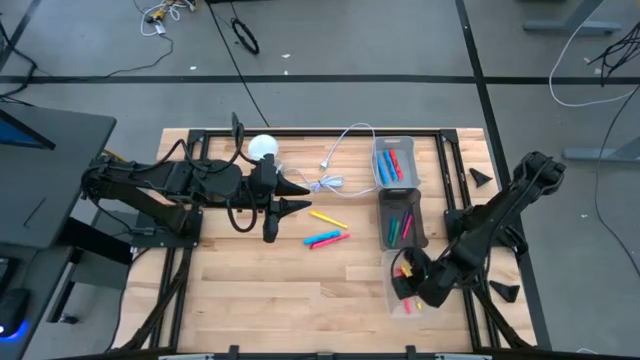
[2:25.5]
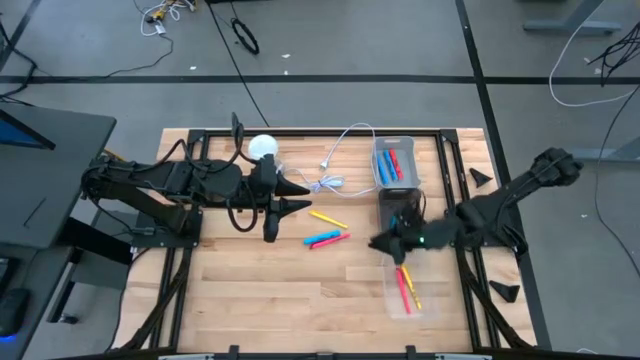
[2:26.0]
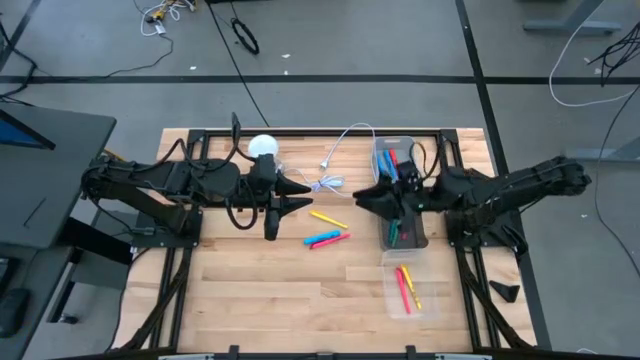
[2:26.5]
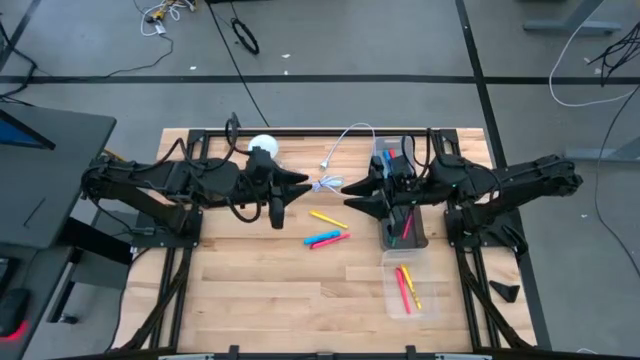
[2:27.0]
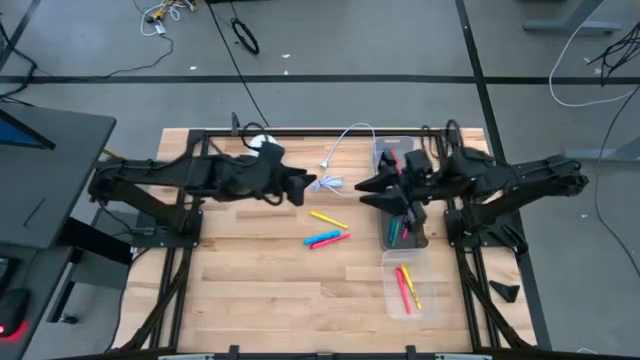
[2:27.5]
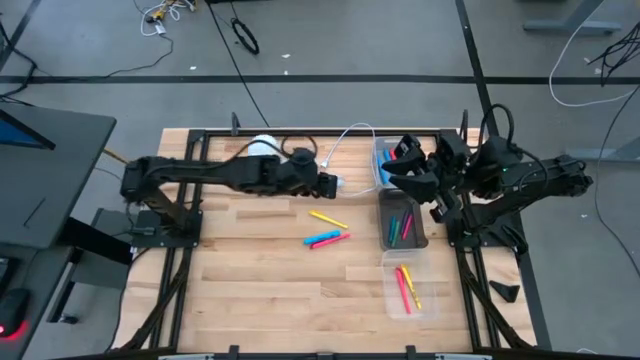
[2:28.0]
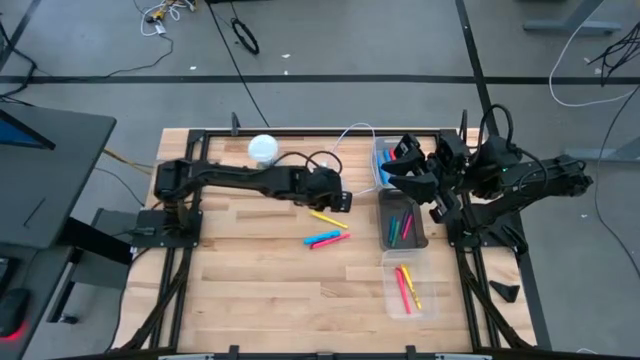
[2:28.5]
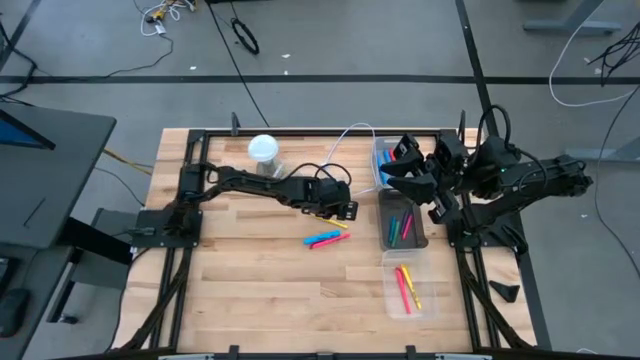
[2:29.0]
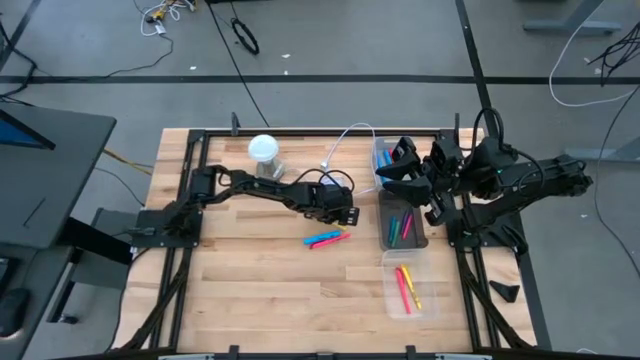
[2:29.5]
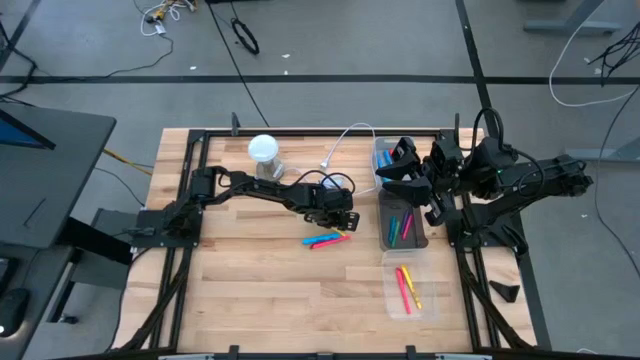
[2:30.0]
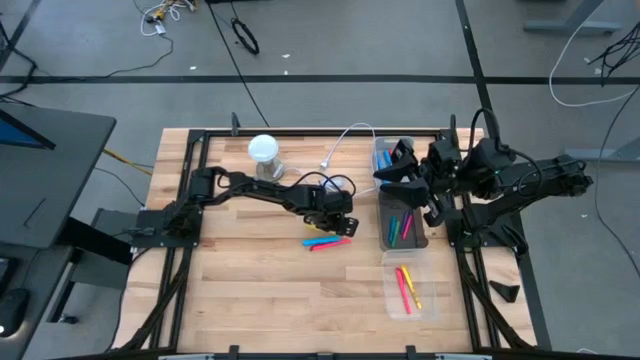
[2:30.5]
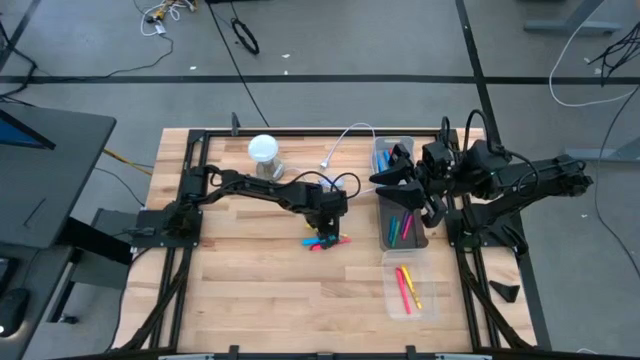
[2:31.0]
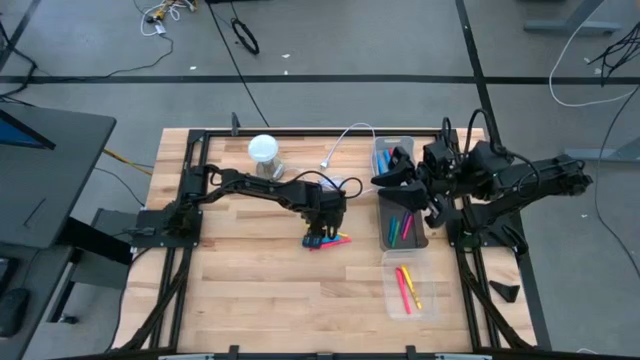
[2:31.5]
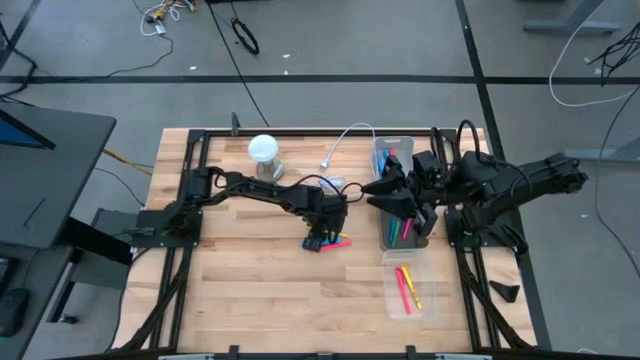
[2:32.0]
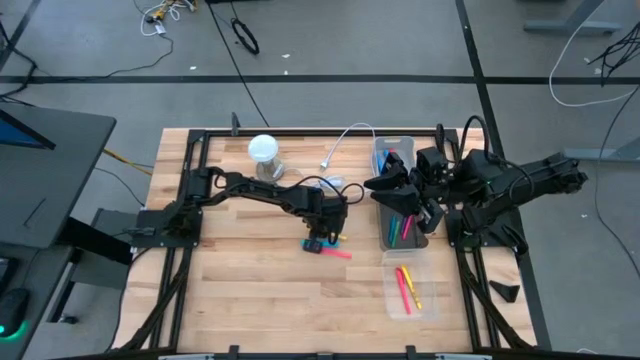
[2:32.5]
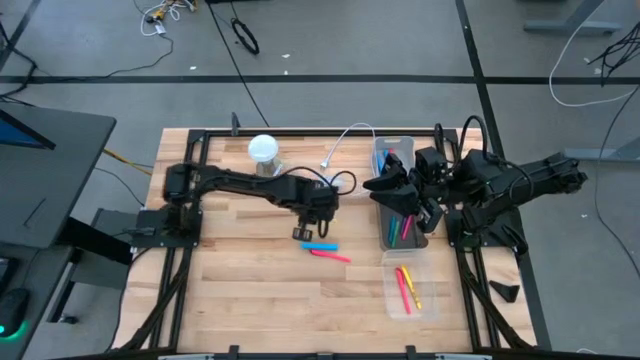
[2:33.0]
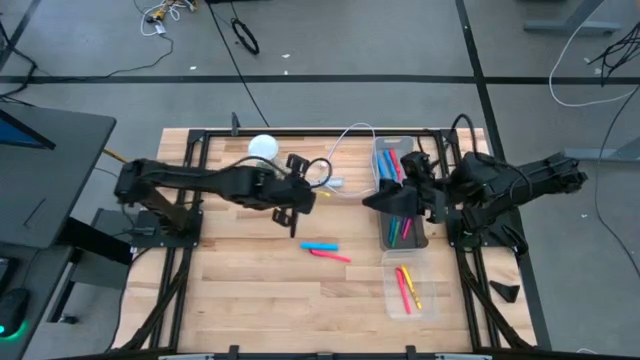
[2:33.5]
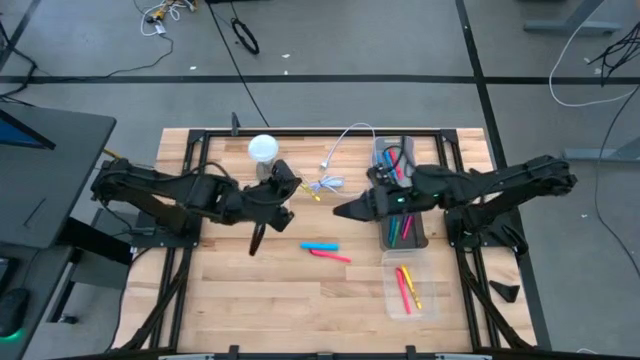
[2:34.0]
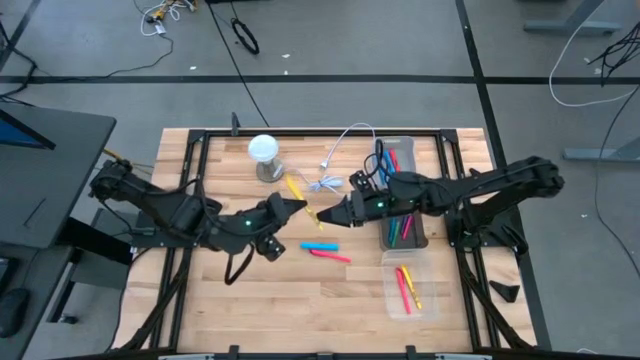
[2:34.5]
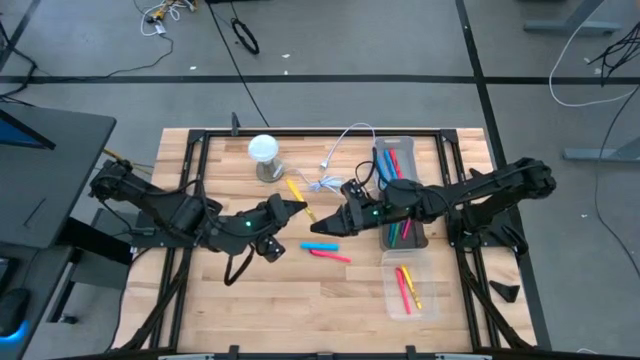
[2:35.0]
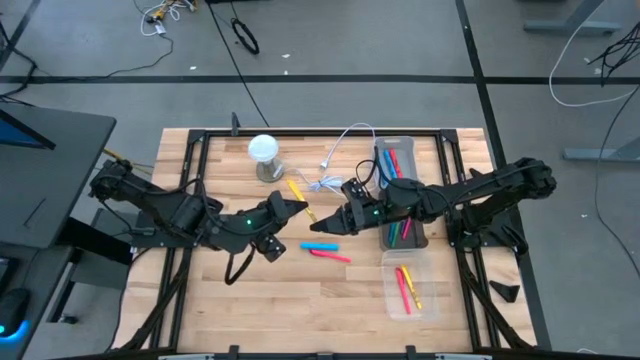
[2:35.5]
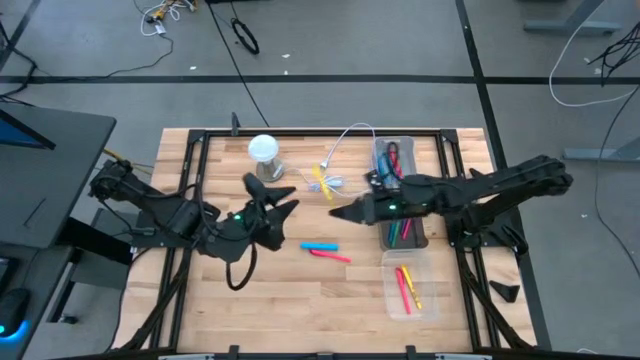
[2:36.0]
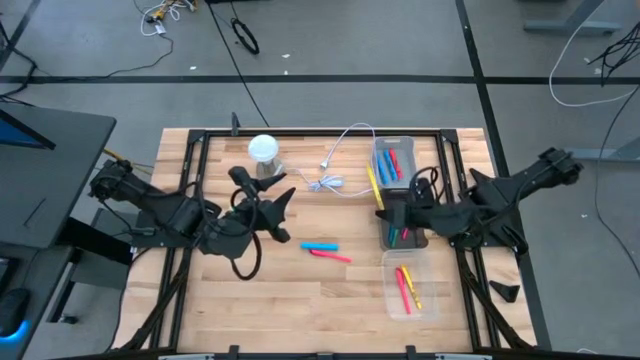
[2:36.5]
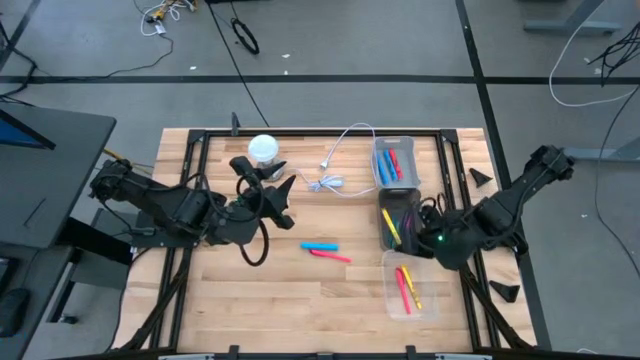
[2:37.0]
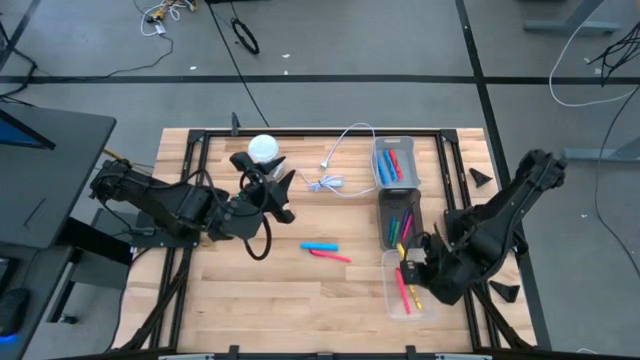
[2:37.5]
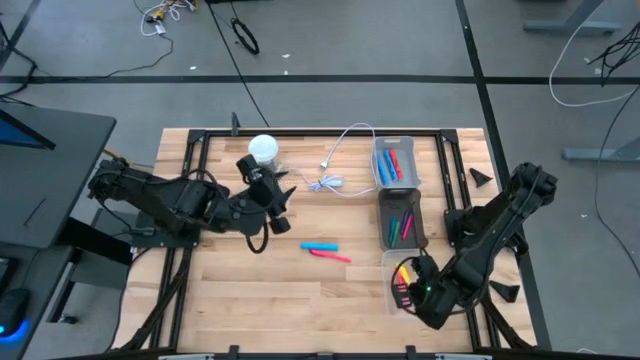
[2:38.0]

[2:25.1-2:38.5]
Task: Pick & Place Markers
Put the yellow pen into the transparent bin

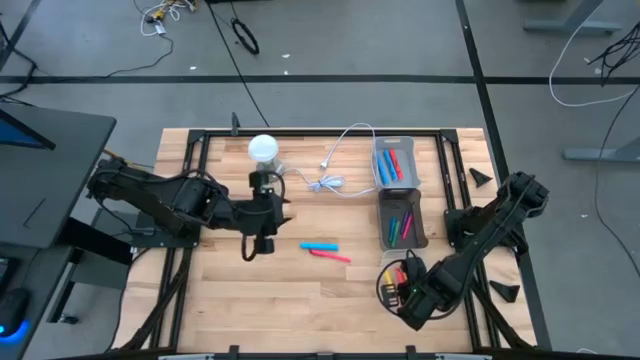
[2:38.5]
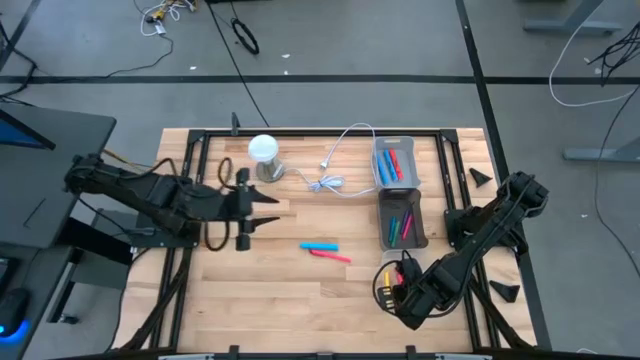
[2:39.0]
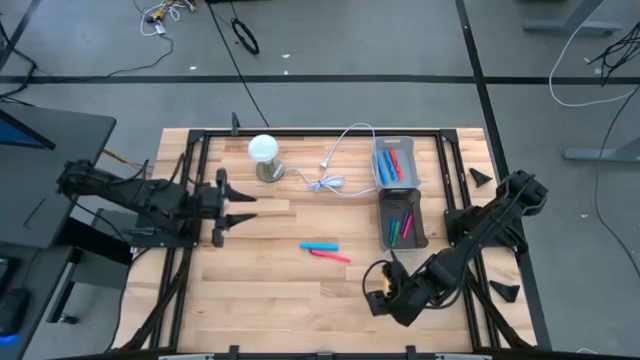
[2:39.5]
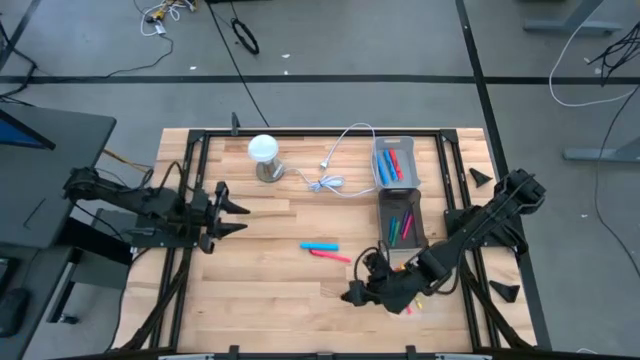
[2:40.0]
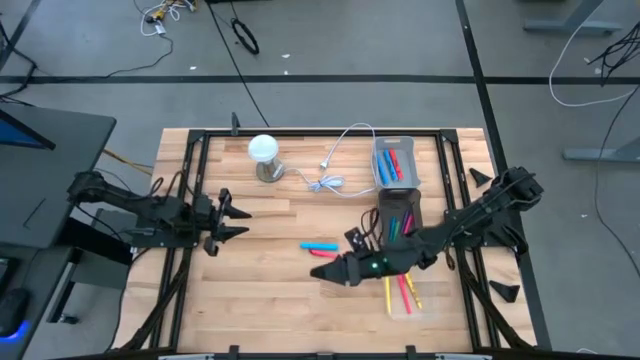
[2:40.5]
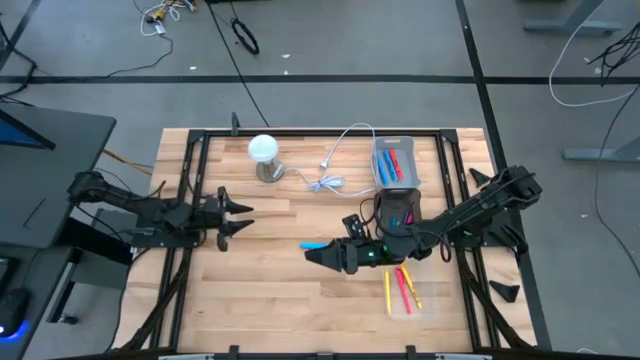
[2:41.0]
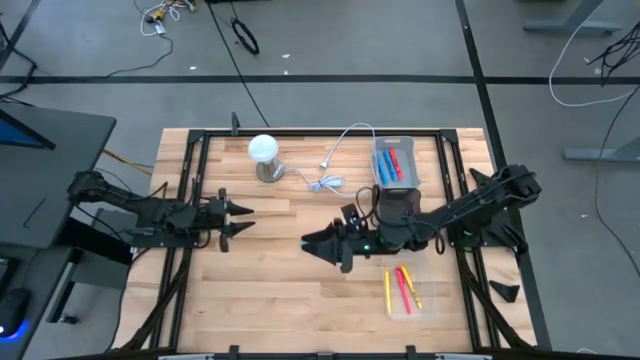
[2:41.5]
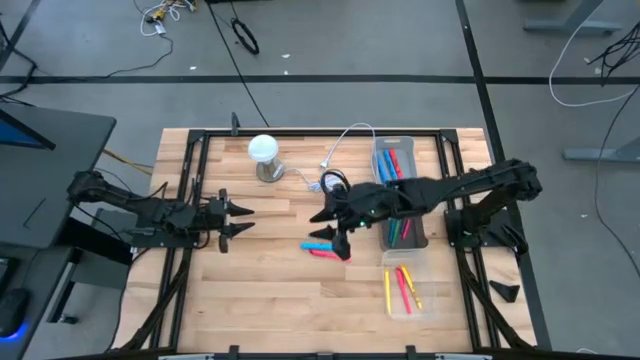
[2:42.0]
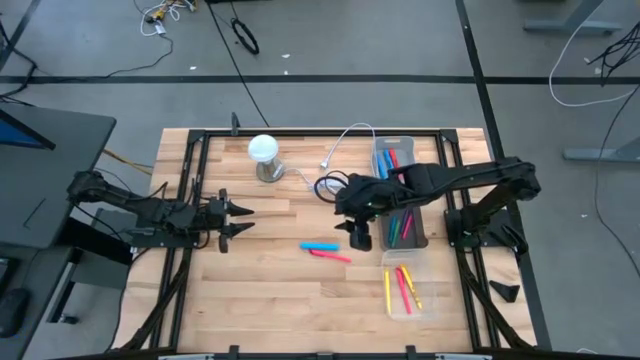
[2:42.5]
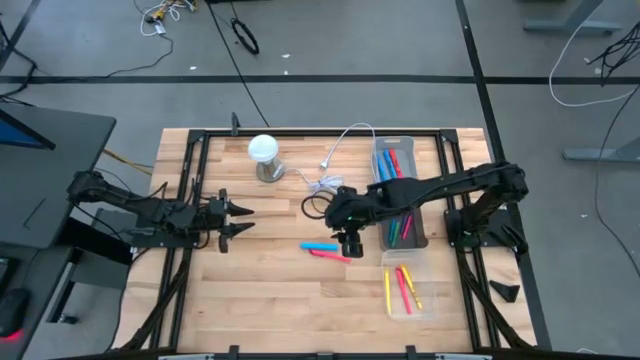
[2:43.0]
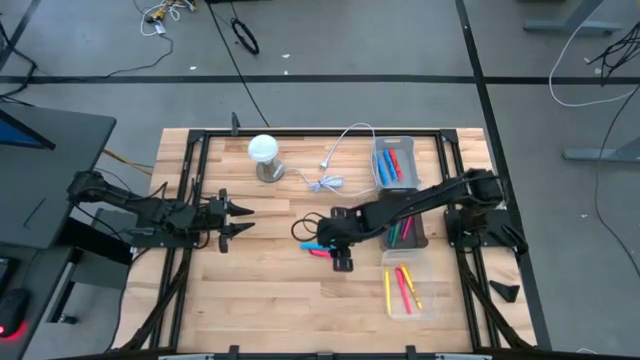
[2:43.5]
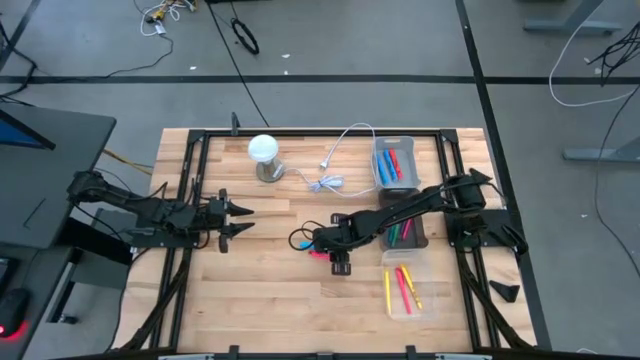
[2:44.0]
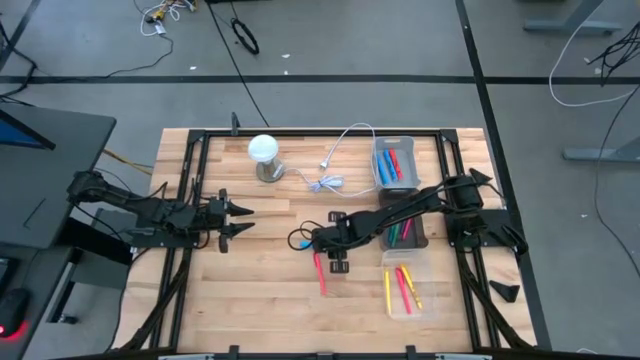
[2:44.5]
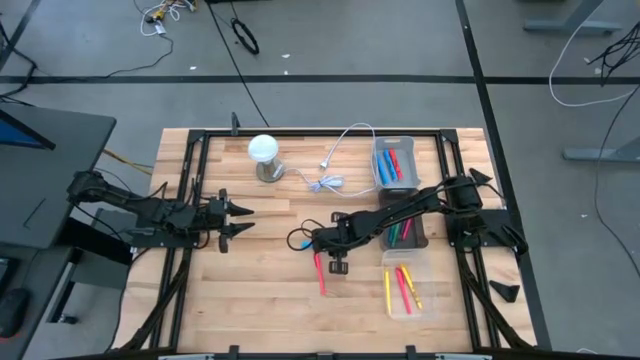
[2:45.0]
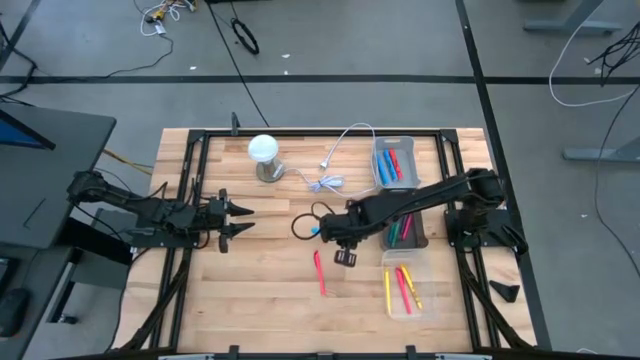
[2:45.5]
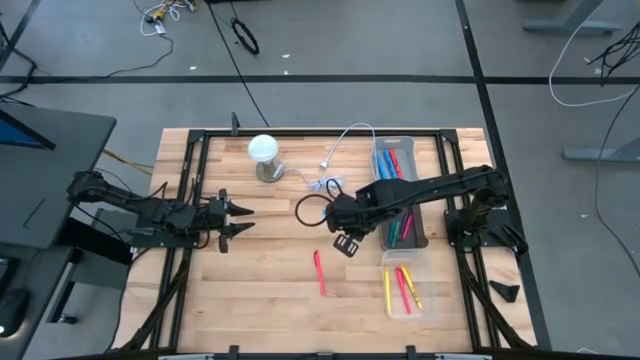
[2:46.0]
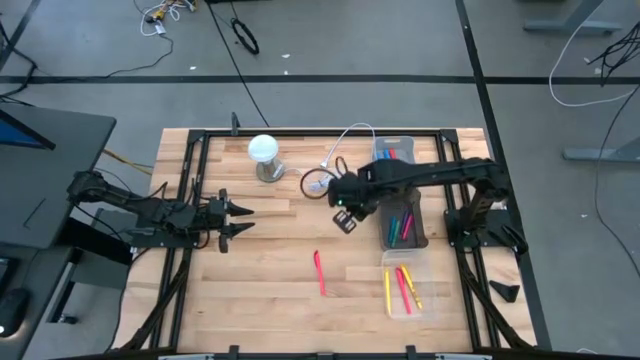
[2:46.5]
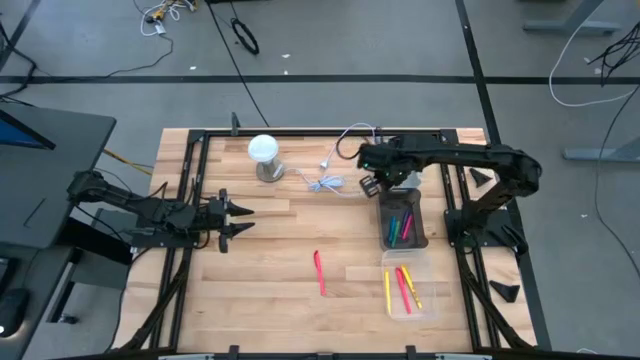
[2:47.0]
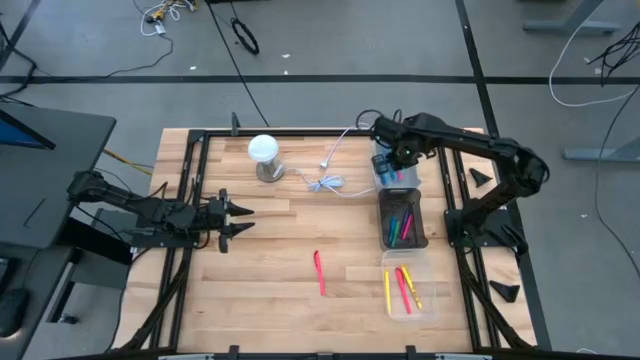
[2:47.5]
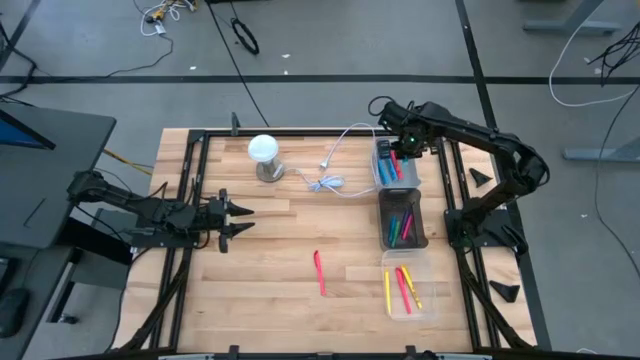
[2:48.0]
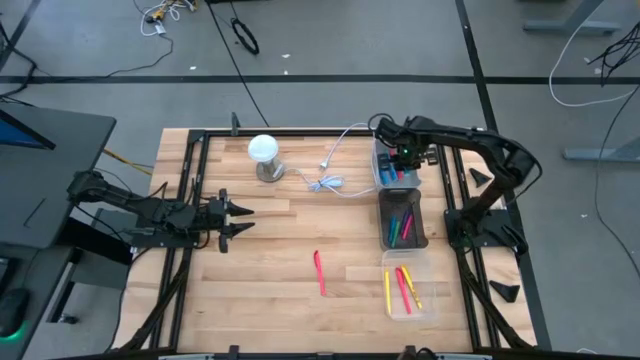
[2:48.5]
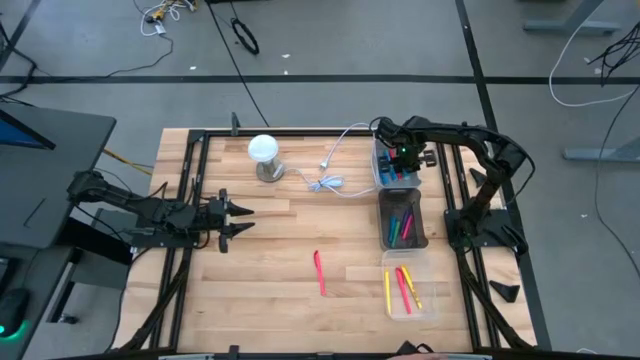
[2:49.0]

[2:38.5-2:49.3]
Put the blue highlighter into the gray bin
